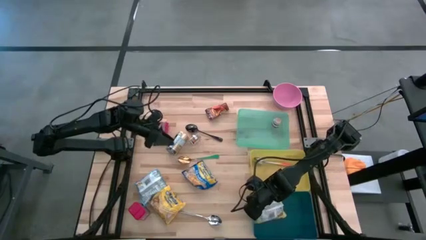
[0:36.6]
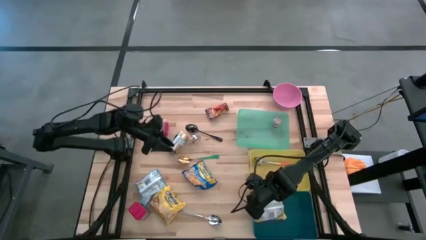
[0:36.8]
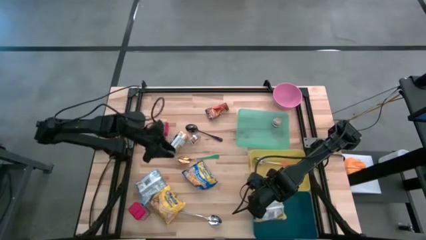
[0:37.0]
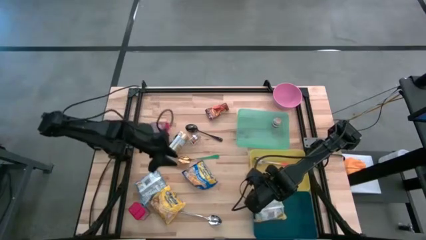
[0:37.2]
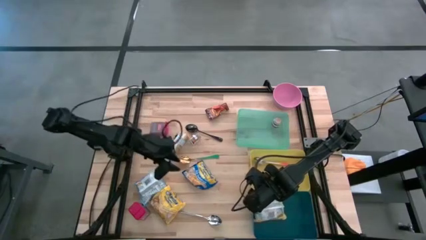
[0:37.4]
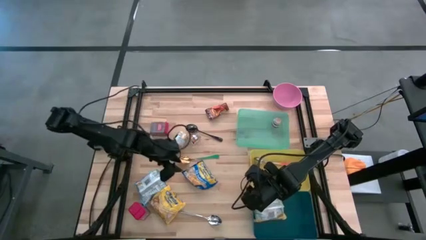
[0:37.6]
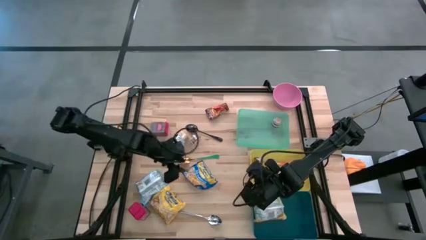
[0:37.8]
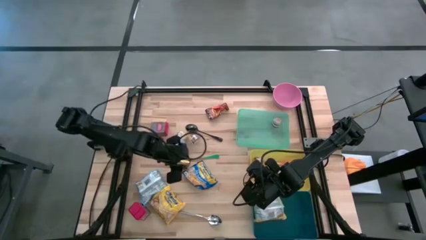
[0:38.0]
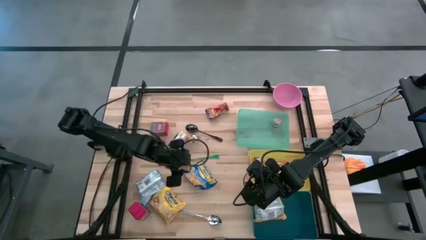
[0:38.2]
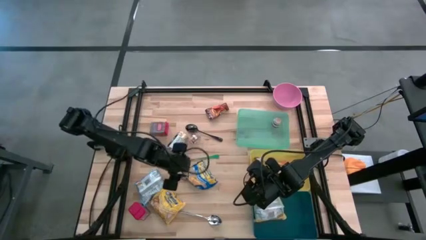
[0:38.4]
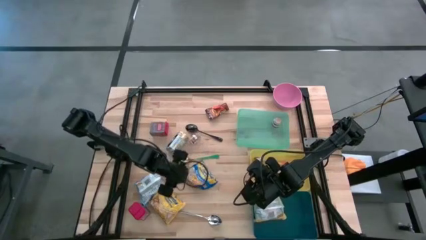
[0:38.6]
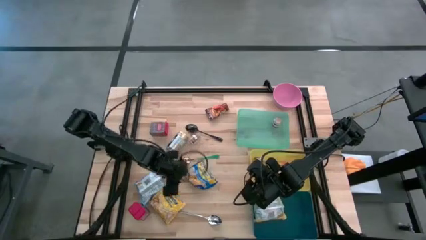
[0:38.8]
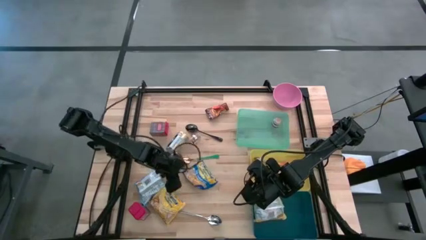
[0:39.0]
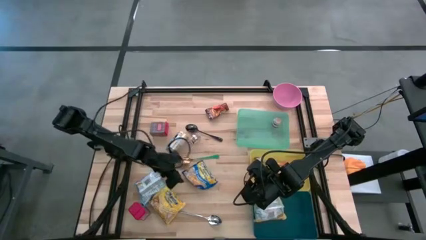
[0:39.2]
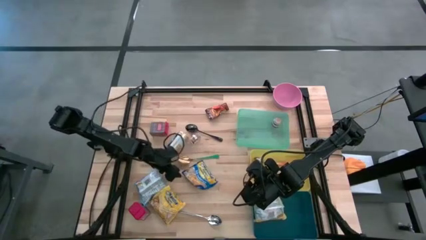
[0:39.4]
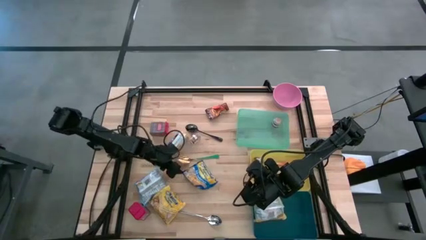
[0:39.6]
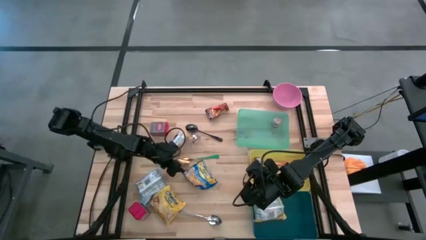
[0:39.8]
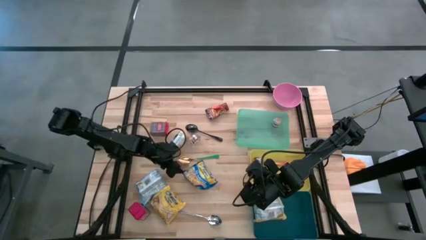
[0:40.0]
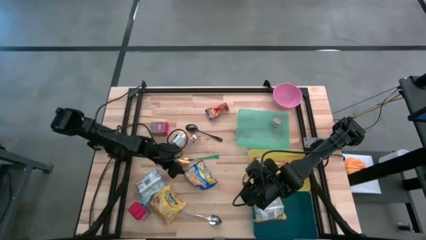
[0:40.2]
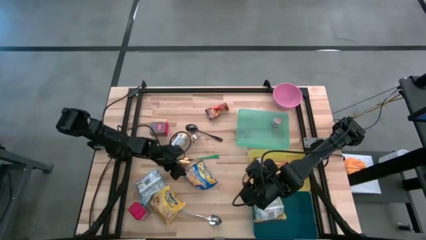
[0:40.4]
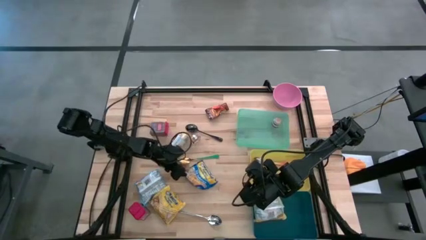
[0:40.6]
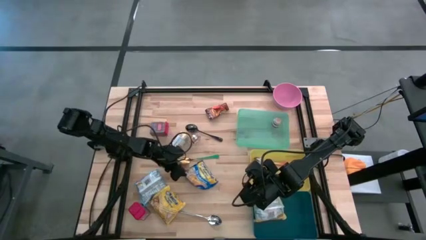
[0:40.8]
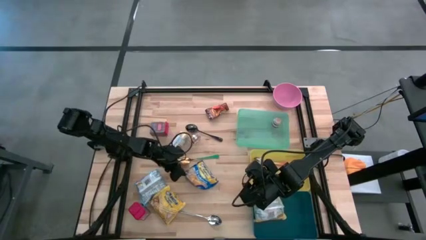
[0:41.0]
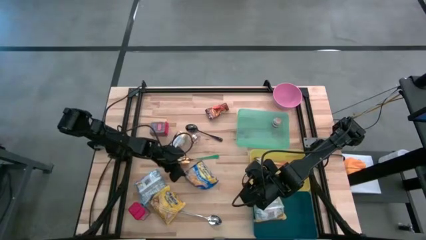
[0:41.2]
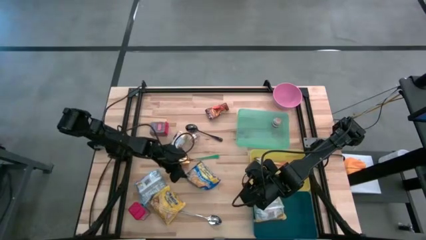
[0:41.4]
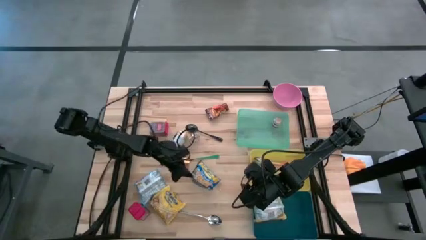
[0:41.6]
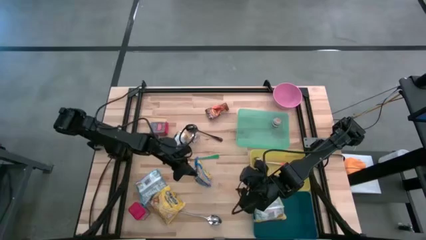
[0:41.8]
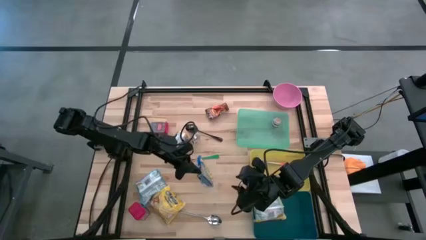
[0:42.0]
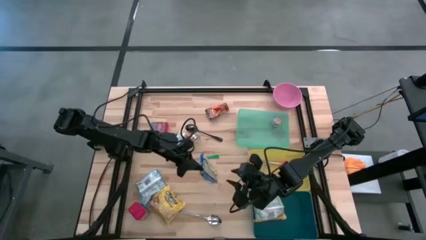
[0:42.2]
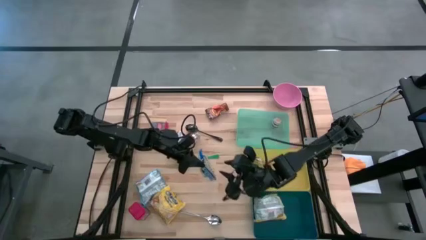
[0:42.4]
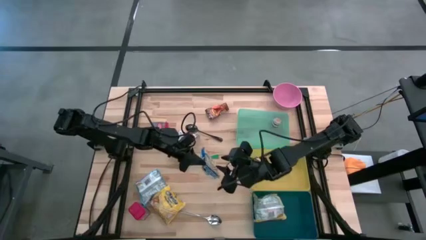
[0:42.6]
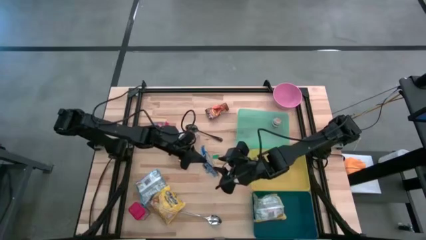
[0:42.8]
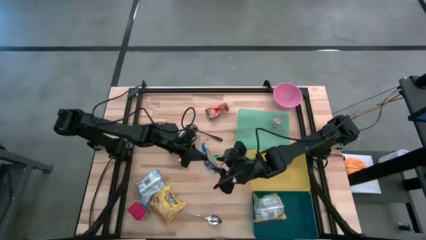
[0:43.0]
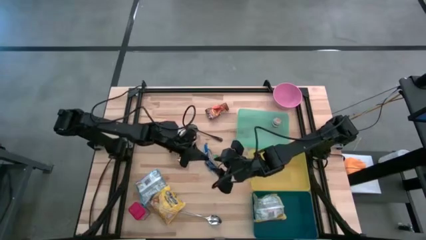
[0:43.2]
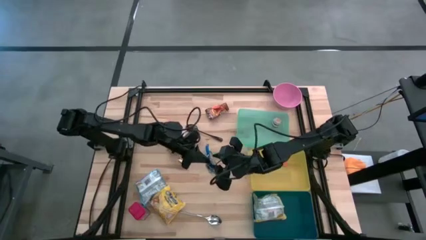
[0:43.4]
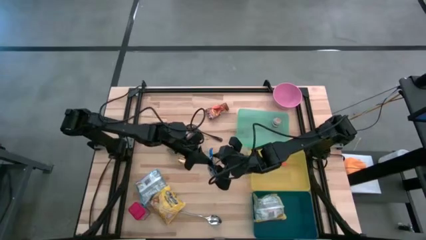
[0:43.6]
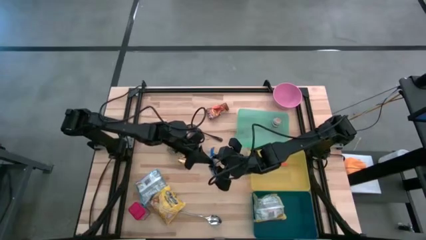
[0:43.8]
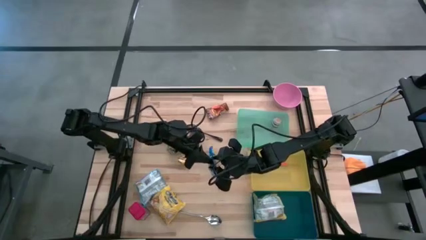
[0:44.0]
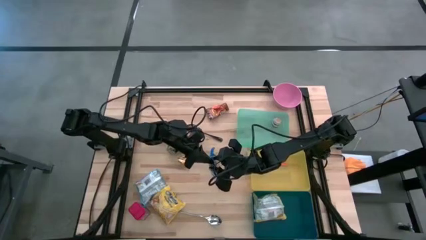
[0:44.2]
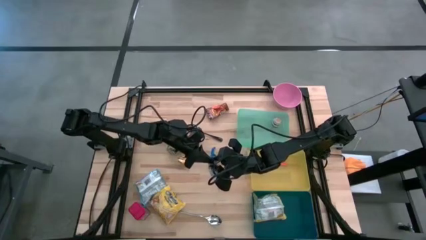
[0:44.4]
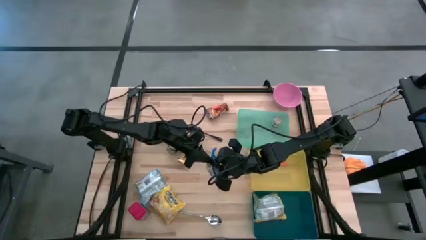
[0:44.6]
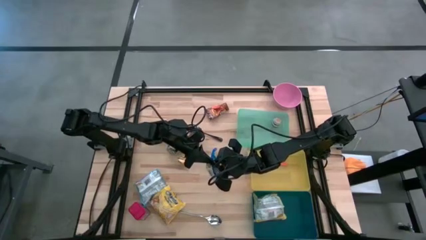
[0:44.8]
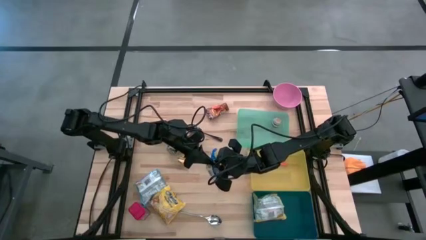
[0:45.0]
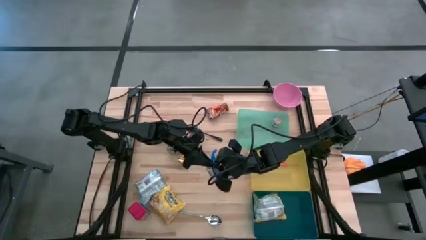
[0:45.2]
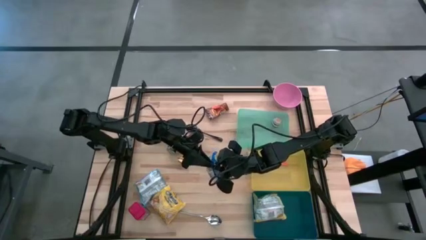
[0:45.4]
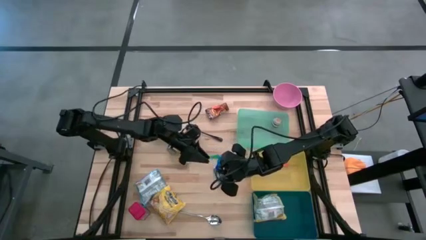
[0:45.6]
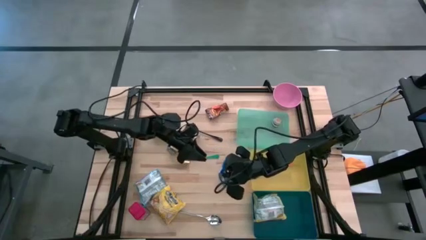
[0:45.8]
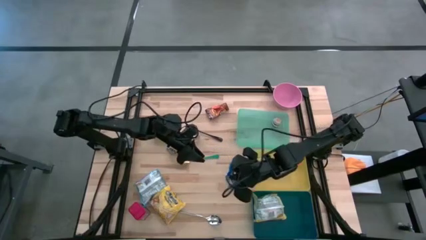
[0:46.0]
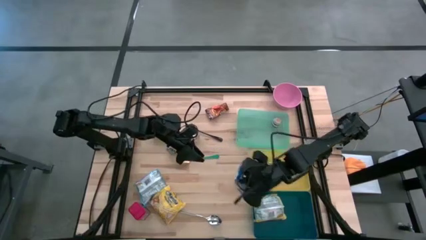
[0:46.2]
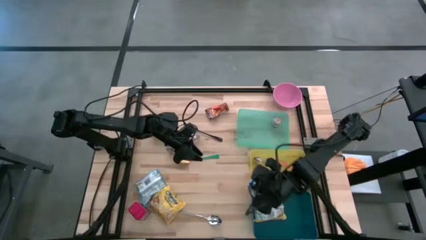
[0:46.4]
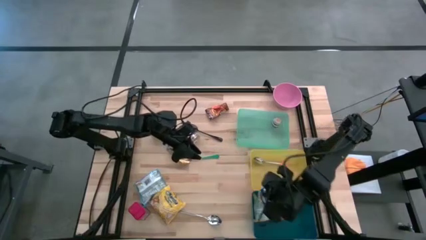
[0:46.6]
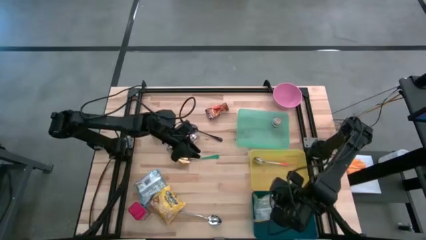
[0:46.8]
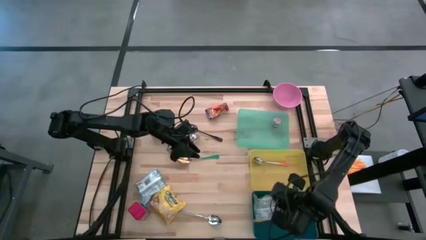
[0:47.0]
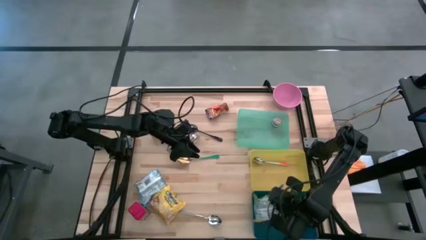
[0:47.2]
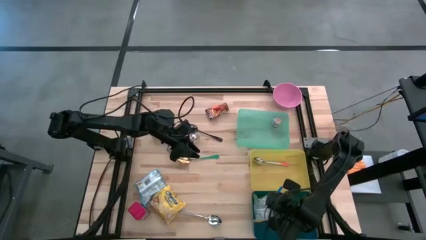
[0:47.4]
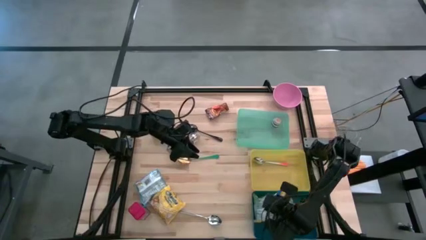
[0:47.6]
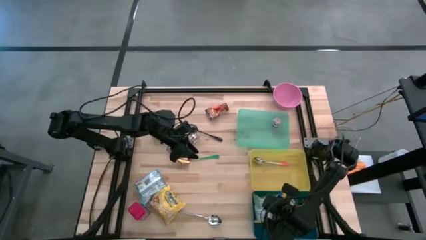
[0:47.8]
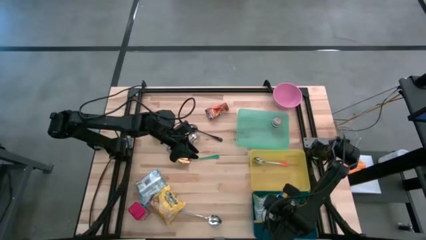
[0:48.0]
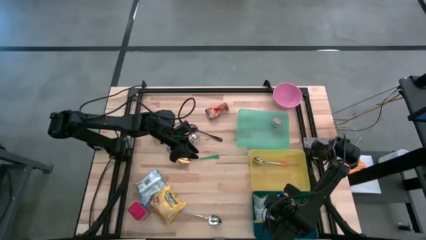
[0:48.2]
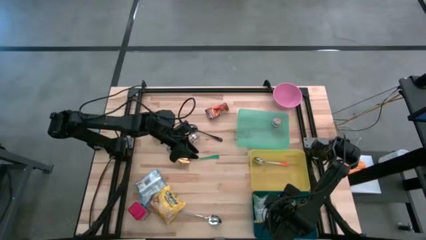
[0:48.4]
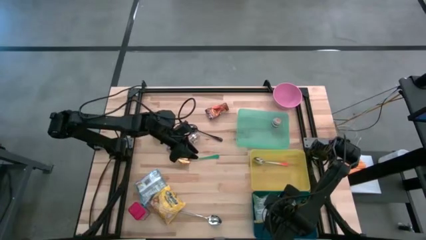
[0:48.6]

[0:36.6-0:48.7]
Put the blue noodle pack into the blue bin
